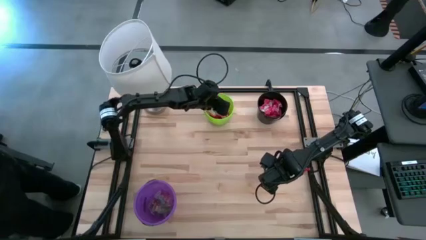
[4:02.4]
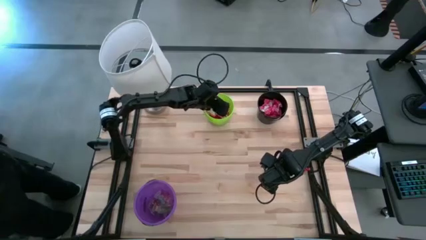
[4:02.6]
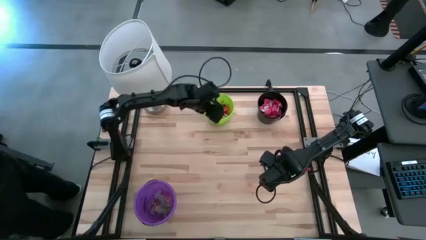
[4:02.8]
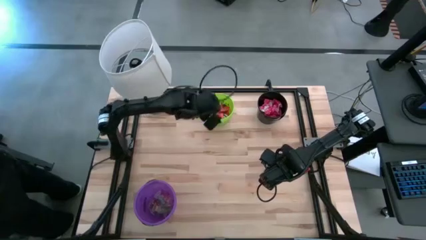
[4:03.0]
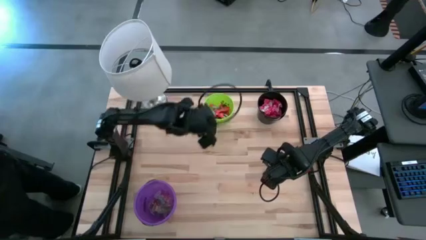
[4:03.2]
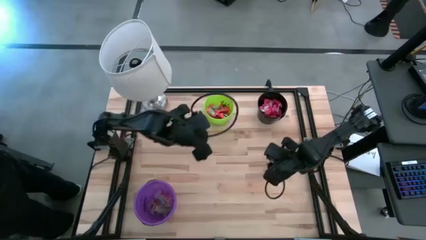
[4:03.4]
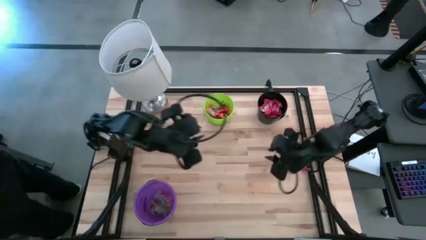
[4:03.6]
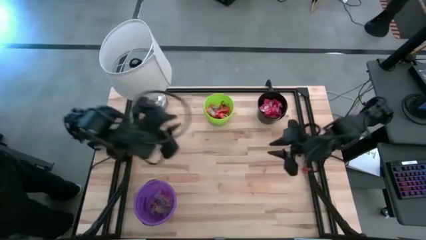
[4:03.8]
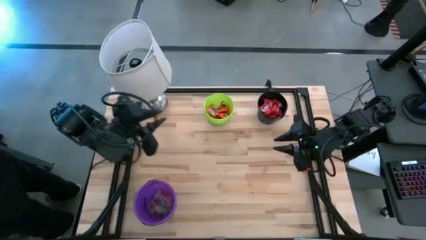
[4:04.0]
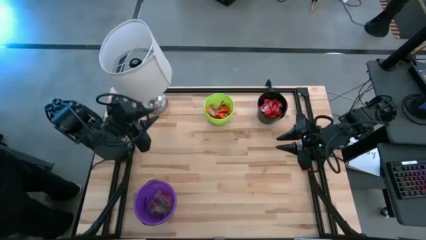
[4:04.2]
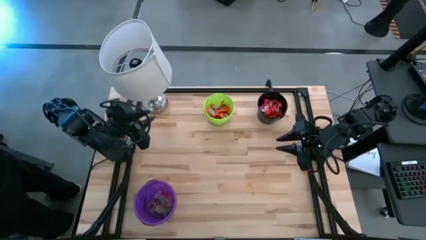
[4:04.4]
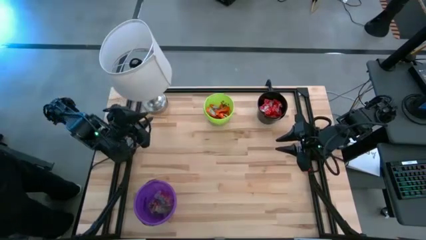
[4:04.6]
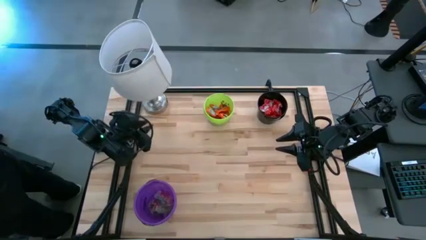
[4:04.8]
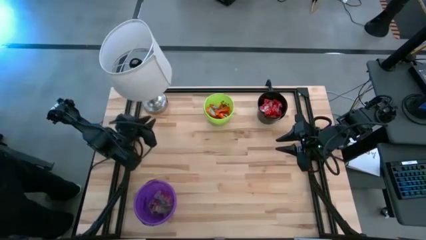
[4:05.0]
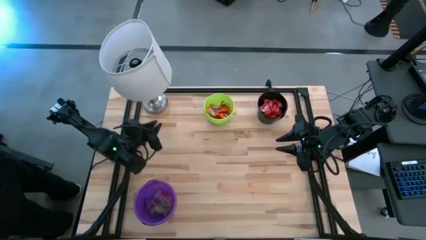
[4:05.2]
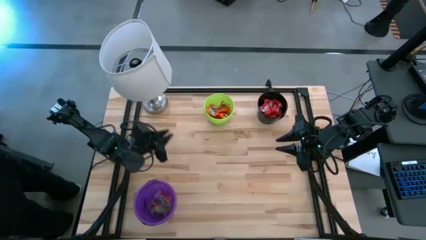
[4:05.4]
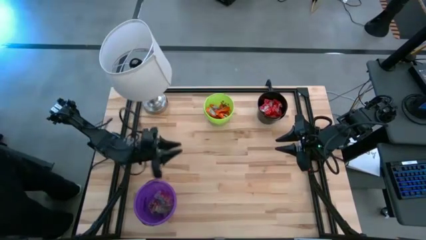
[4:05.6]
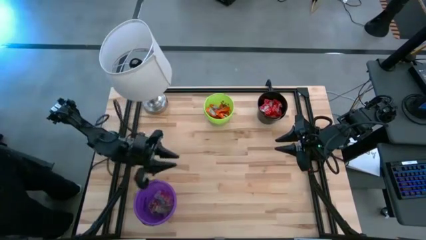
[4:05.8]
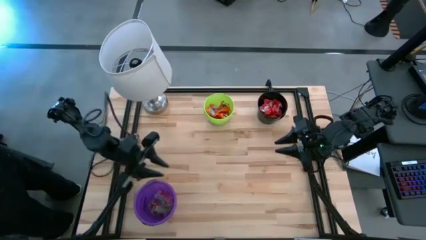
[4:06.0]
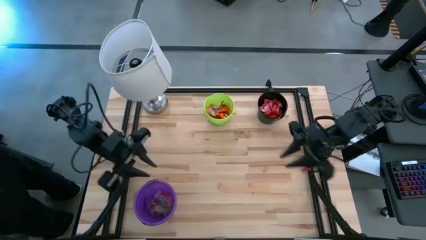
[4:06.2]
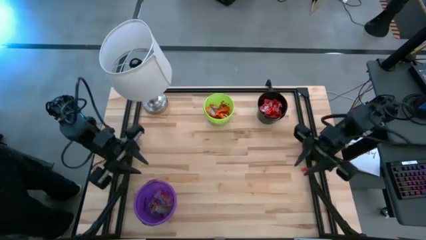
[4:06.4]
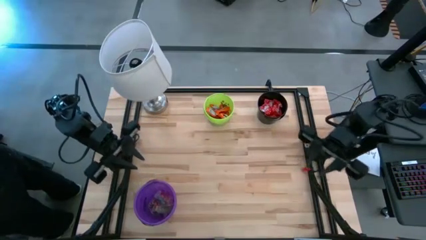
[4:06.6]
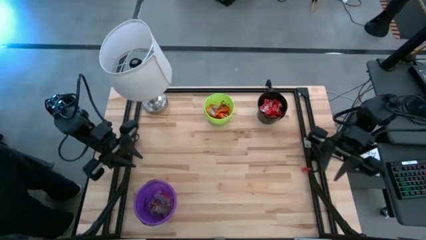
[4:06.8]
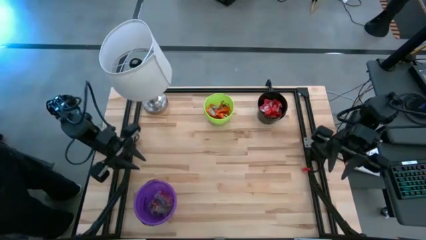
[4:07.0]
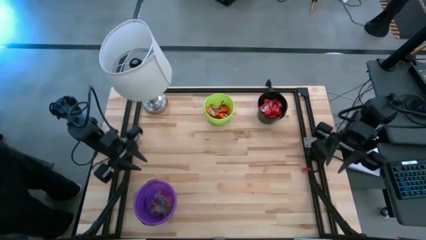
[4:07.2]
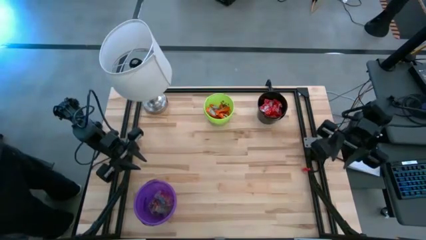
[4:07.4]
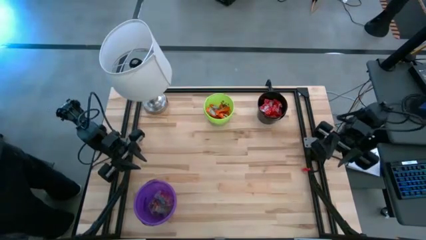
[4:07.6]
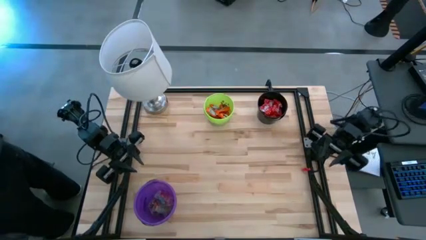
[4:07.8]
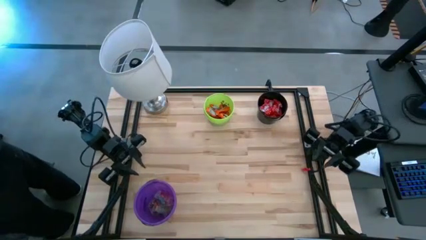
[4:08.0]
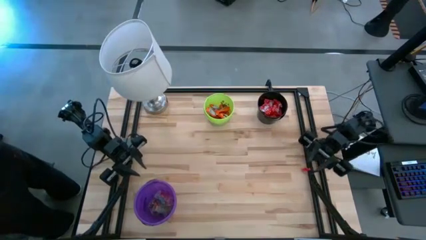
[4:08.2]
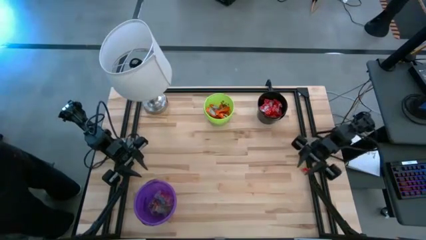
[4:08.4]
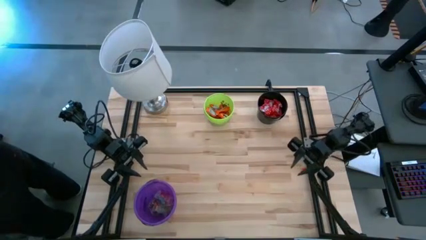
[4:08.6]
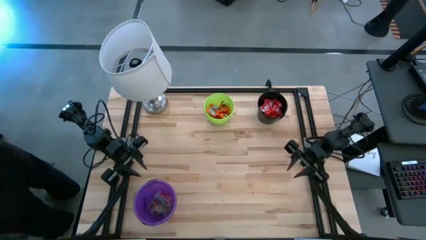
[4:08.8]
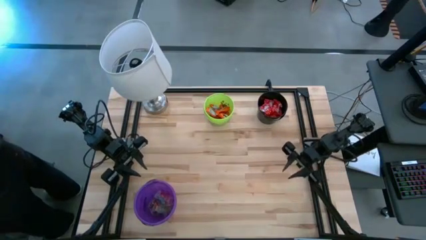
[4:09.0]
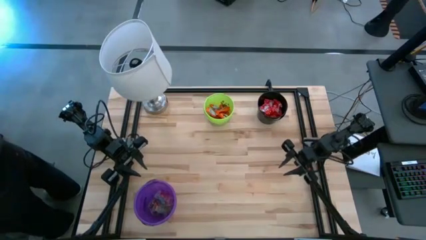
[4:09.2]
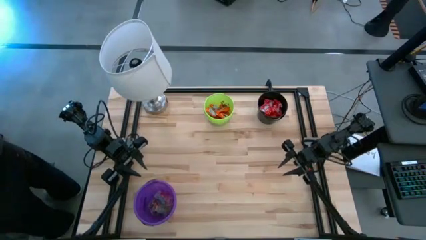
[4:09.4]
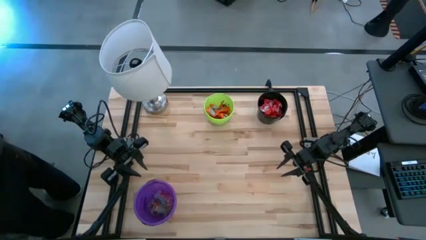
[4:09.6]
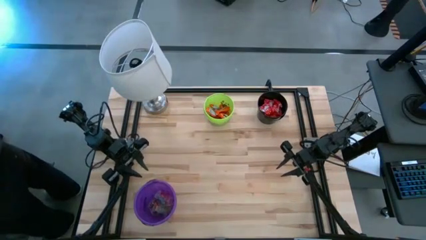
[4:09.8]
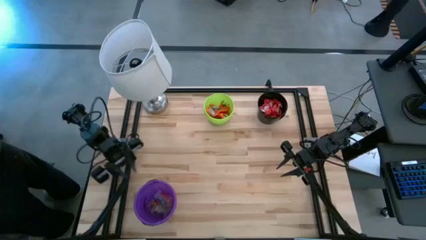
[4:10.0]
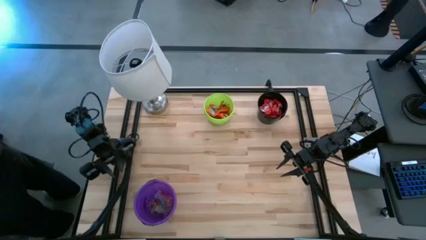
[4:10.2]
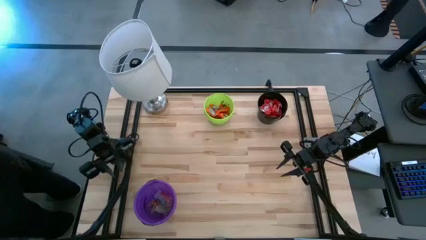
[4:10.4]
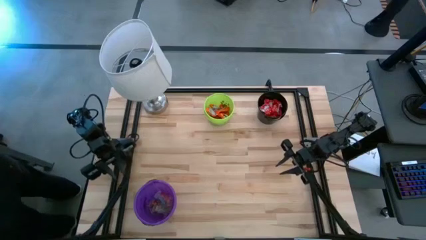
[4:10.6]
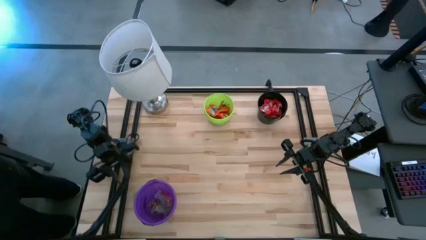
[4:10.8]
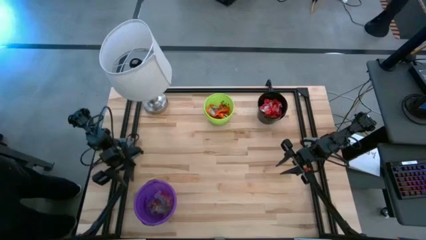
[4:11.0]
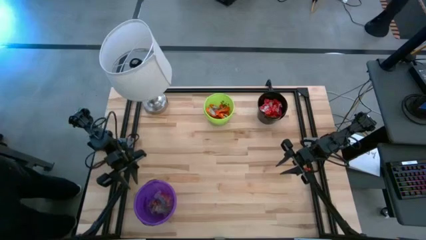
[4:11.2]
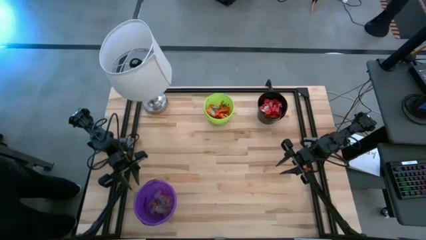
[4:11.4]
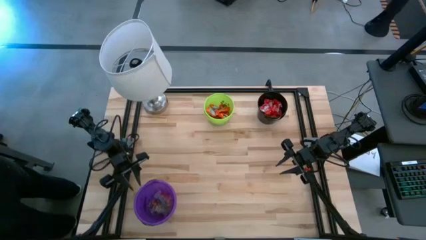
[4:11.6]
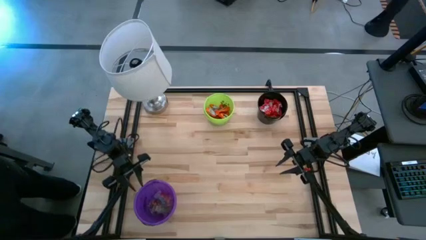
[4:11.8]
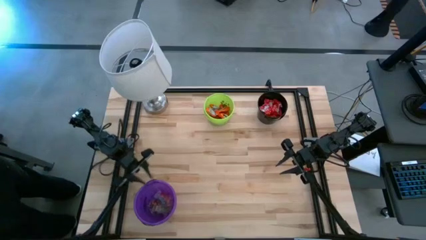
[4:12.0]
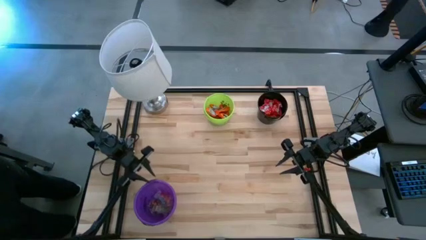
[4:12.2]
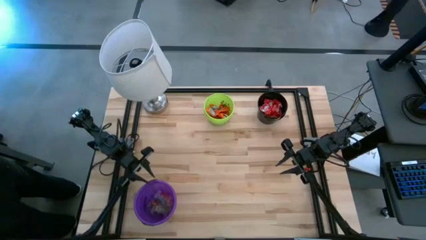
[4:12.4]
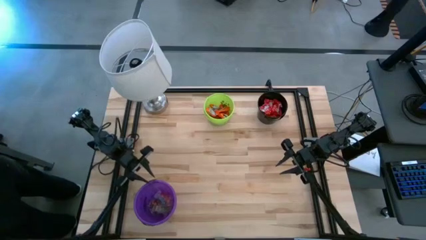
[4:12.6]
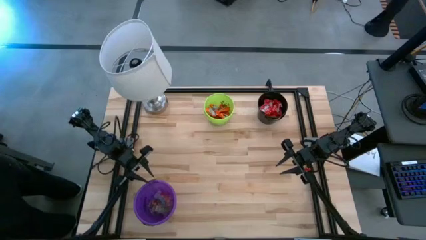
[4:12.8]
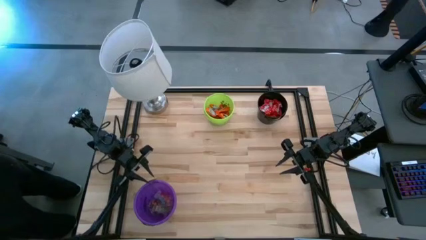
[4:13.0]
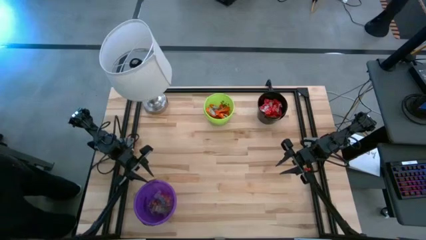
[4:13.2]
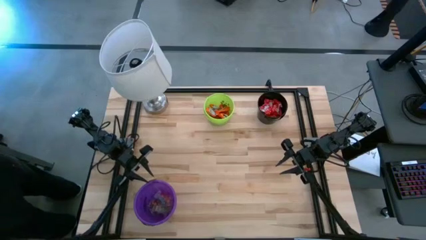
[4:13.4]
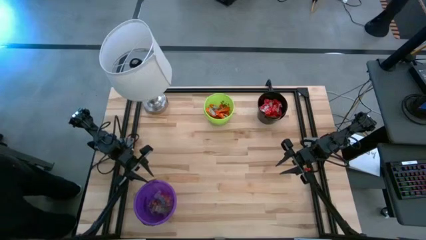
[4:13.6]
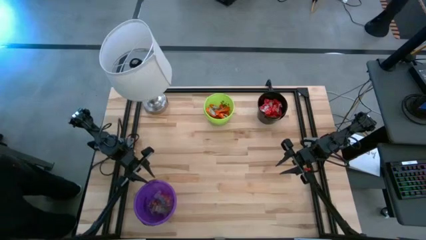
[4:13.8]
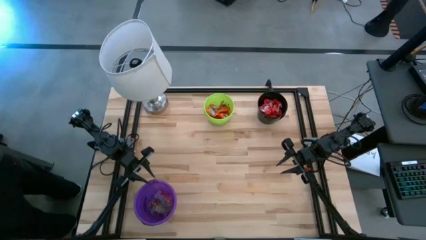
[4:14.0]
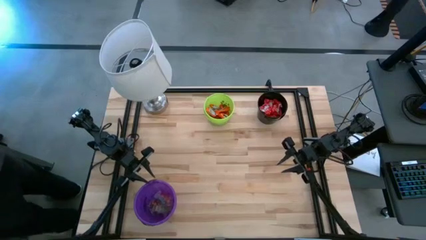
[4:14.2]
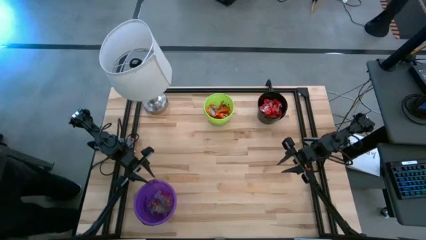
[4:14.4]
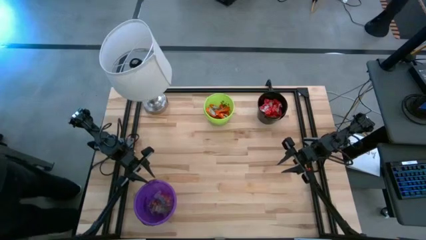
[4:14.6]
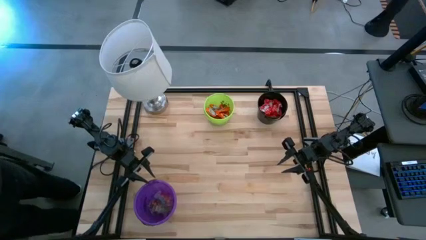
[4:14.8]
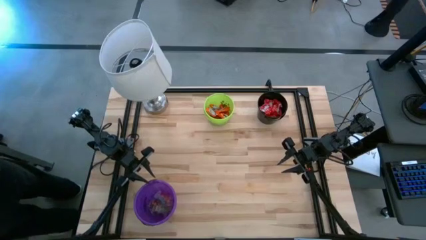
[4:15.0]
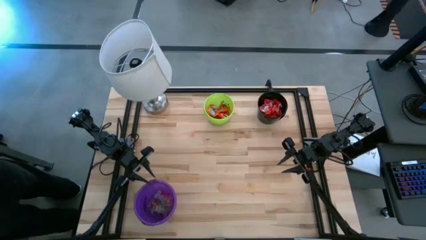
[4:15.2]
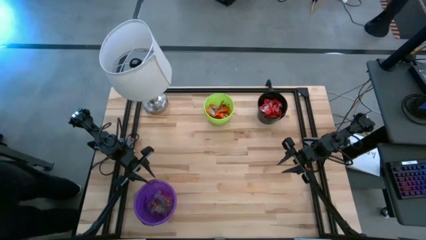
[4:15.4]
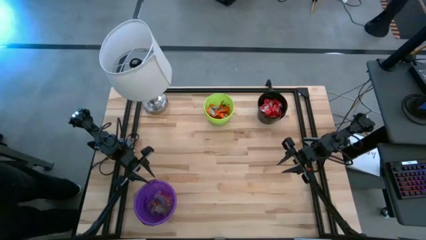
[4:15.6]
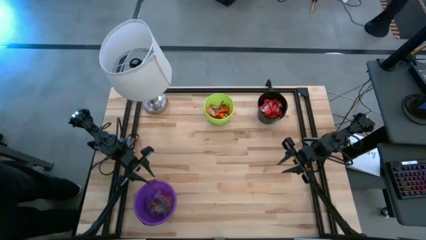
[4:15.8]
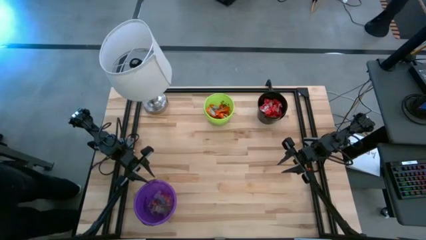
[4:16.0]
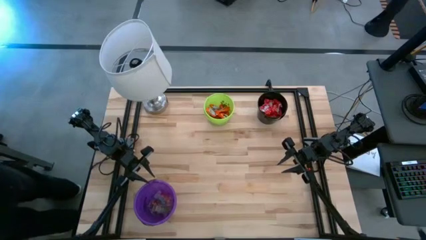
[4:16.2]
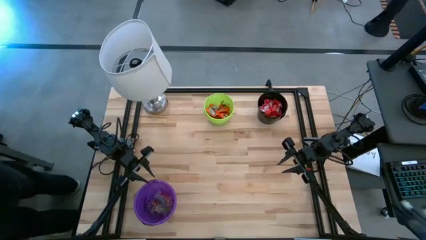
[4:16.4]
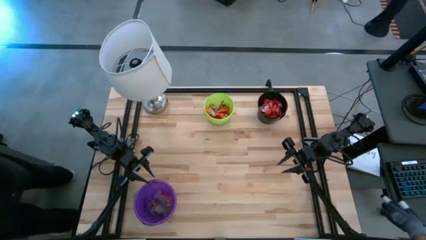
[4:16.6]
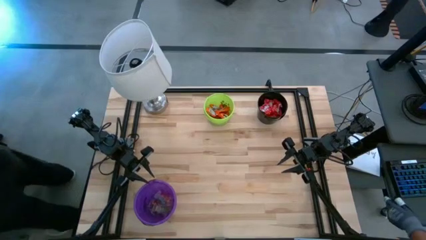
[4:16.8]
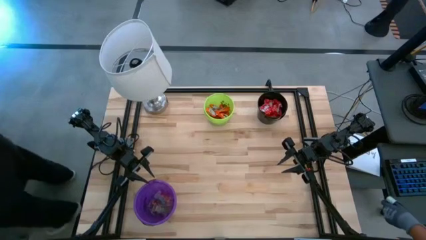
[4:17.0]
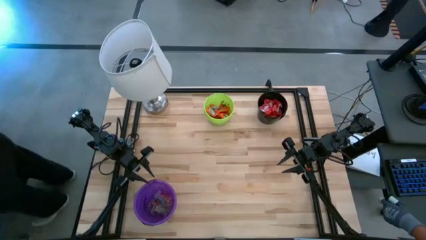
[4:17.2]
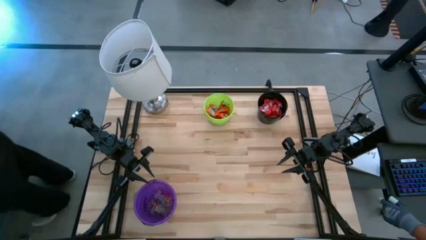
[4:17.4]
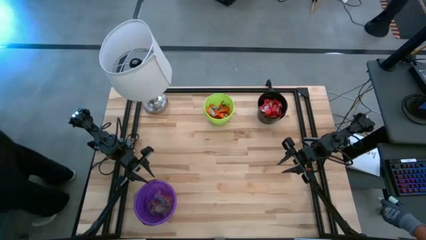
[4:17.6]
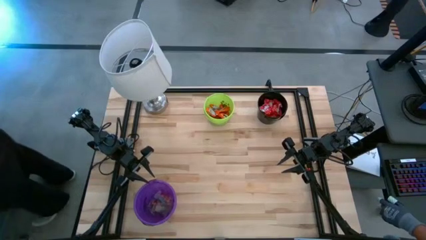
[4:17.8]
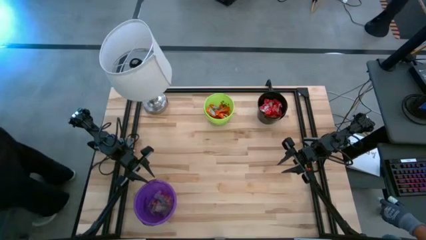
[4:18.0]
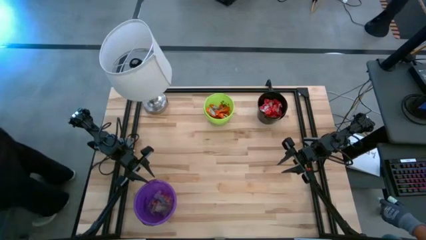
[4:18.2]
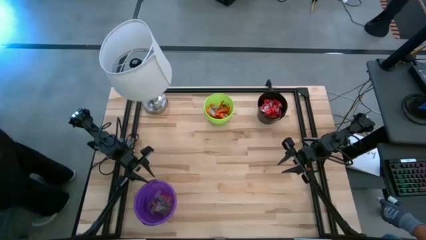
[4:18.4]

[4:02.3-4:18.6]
Task: Sort candy
Return to Home Position
